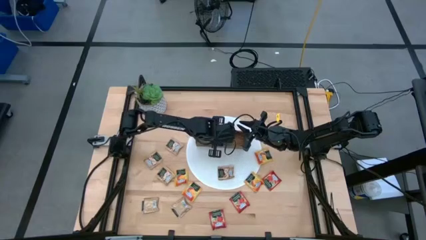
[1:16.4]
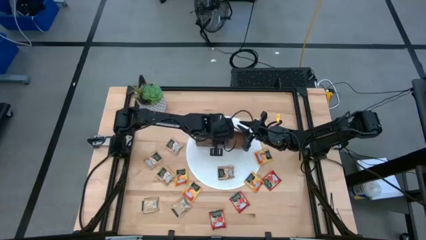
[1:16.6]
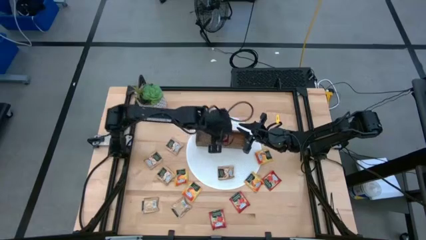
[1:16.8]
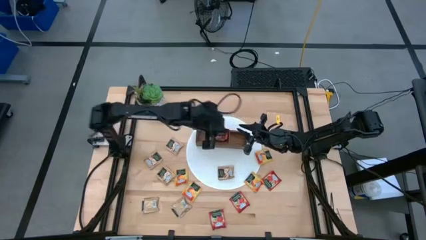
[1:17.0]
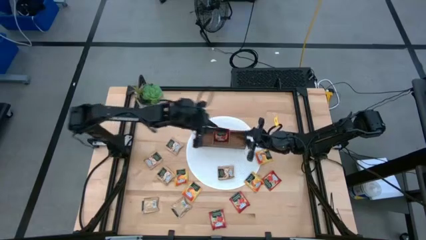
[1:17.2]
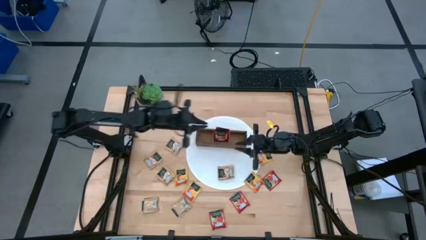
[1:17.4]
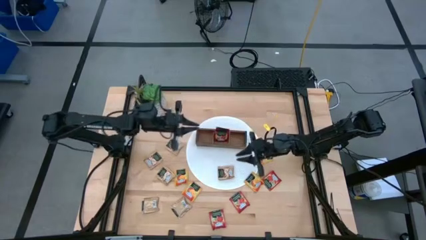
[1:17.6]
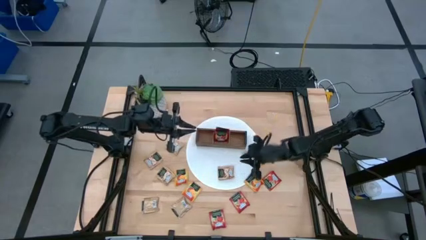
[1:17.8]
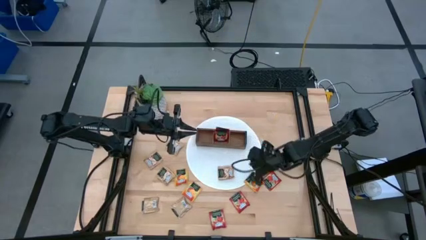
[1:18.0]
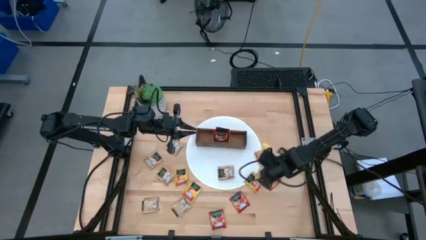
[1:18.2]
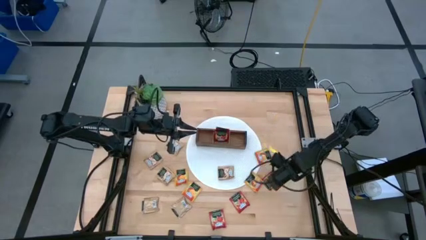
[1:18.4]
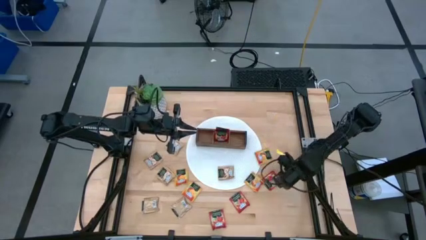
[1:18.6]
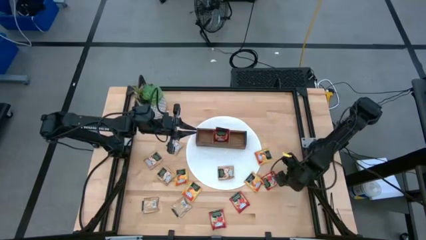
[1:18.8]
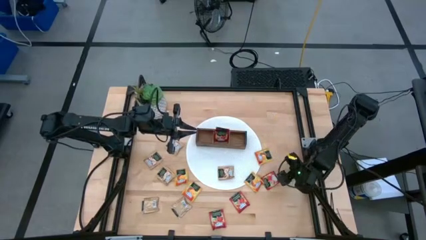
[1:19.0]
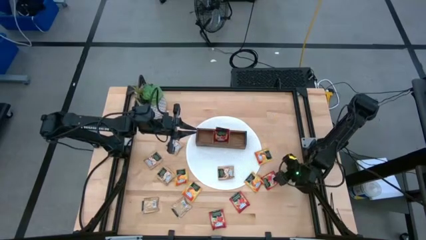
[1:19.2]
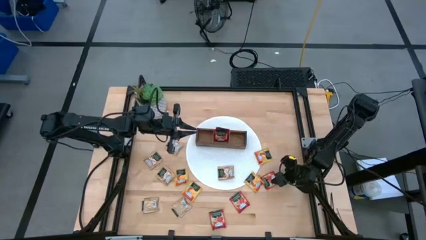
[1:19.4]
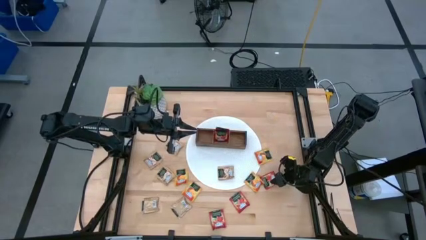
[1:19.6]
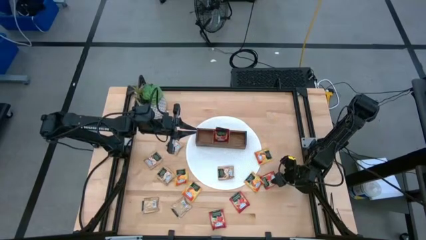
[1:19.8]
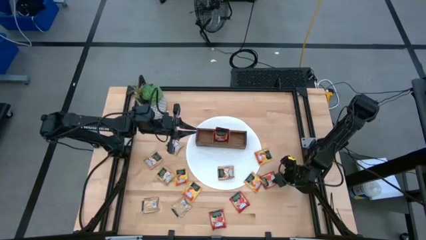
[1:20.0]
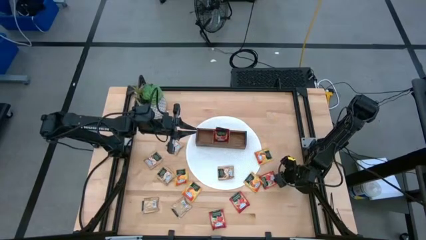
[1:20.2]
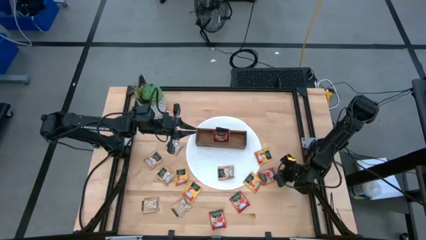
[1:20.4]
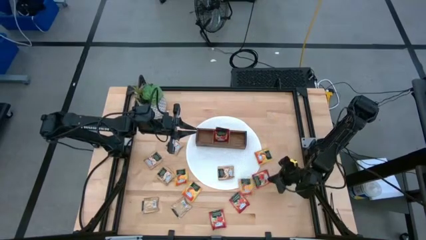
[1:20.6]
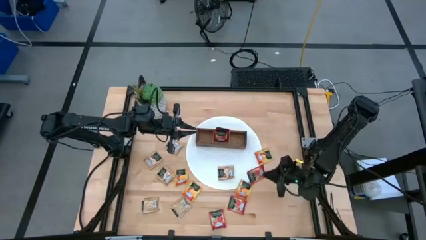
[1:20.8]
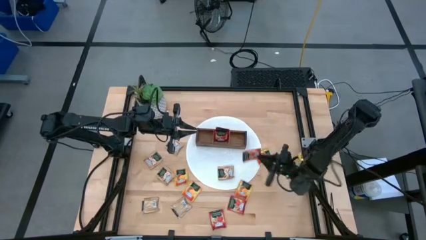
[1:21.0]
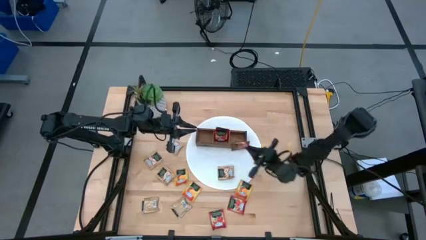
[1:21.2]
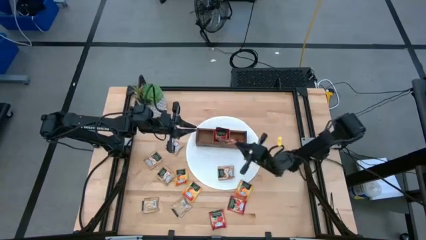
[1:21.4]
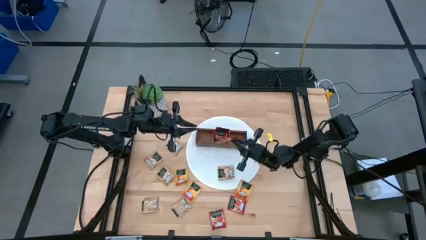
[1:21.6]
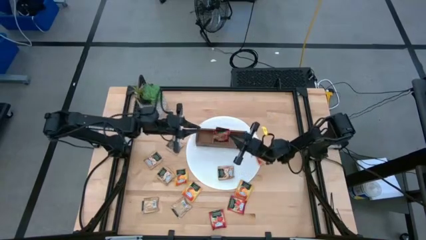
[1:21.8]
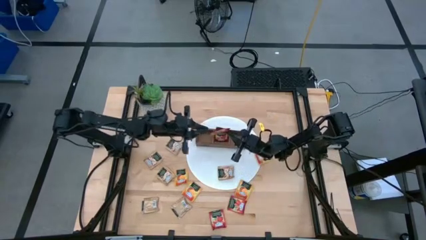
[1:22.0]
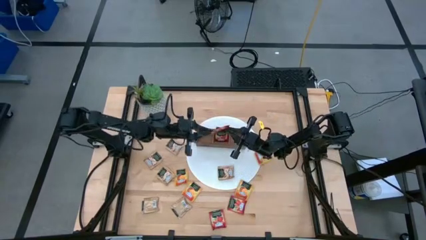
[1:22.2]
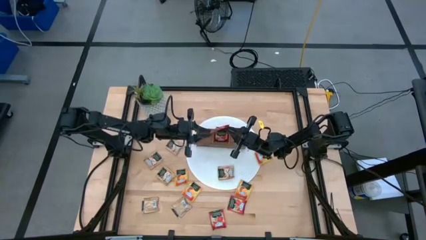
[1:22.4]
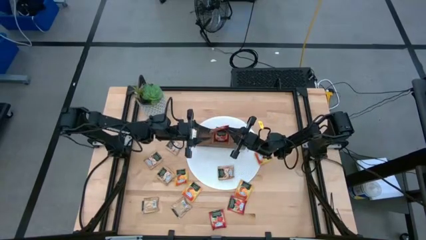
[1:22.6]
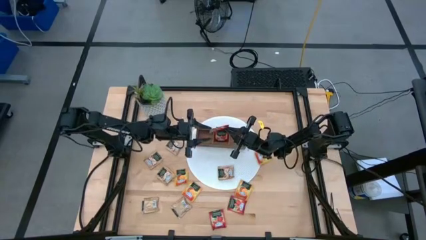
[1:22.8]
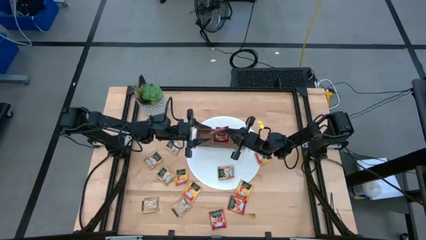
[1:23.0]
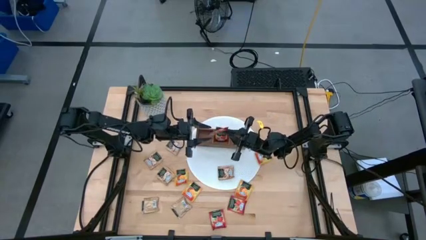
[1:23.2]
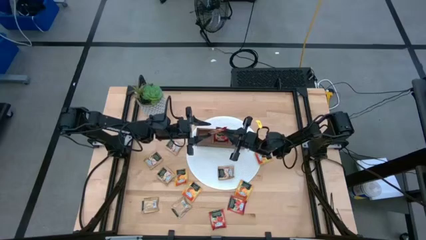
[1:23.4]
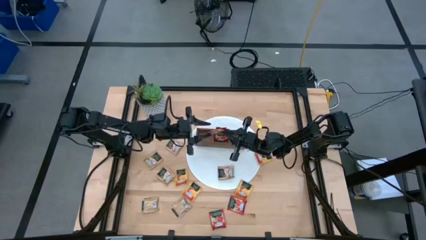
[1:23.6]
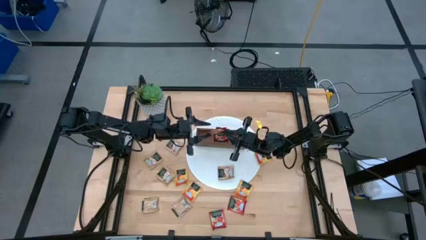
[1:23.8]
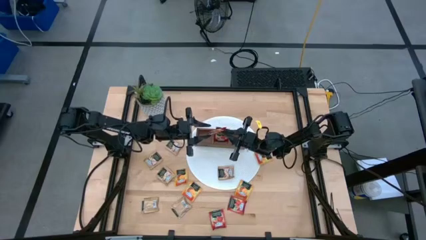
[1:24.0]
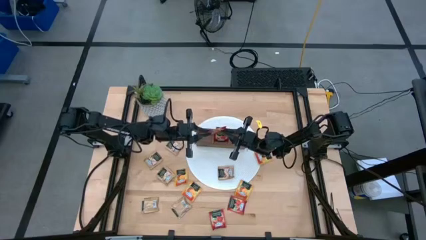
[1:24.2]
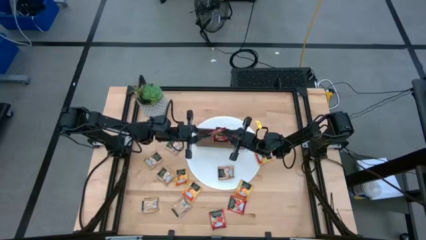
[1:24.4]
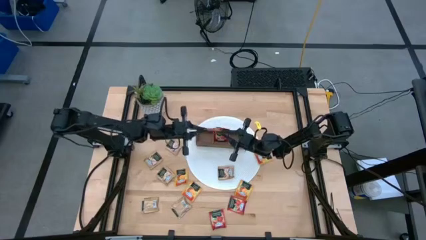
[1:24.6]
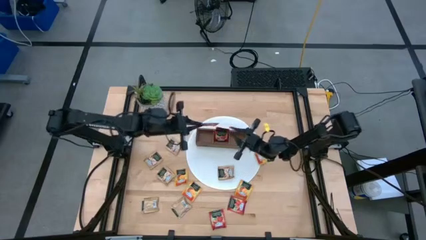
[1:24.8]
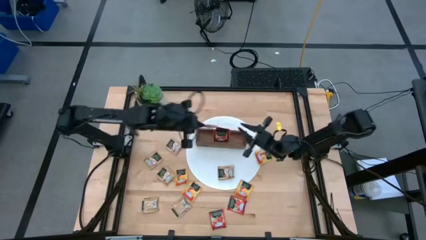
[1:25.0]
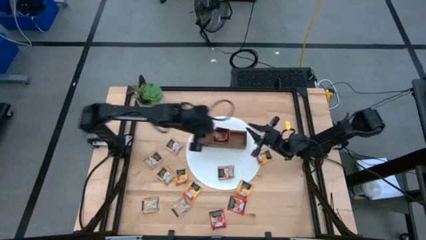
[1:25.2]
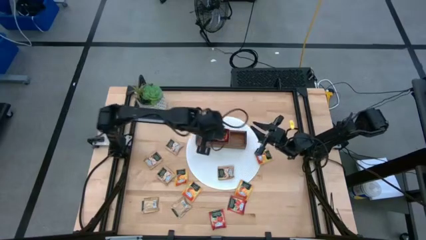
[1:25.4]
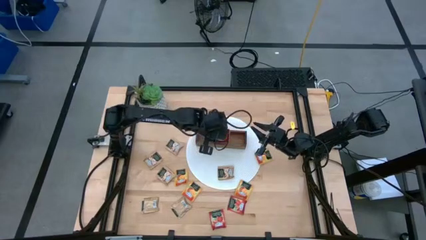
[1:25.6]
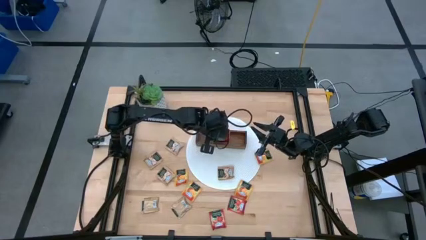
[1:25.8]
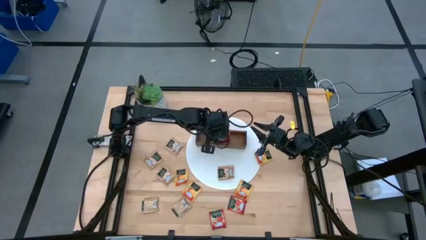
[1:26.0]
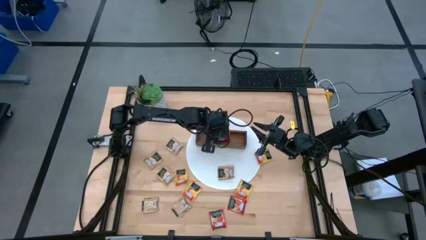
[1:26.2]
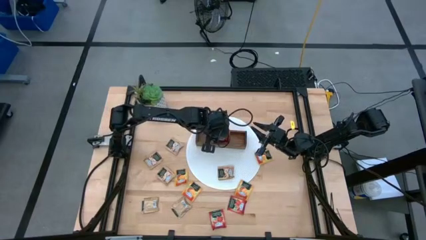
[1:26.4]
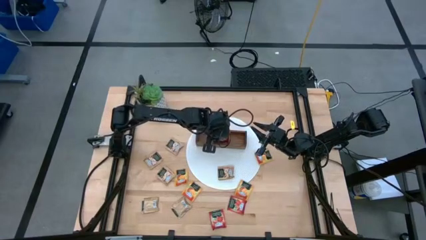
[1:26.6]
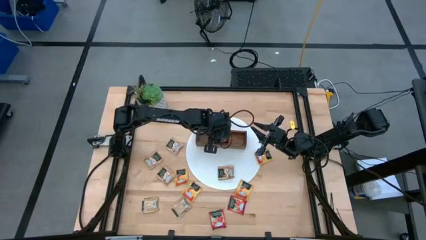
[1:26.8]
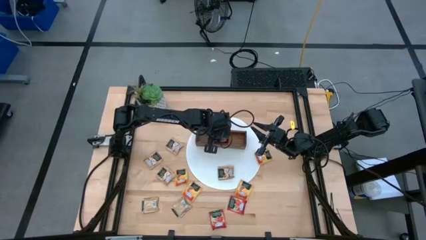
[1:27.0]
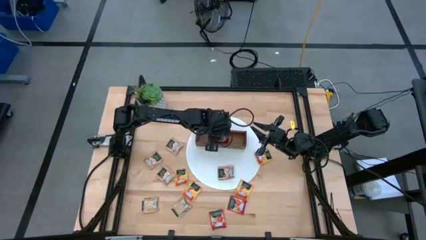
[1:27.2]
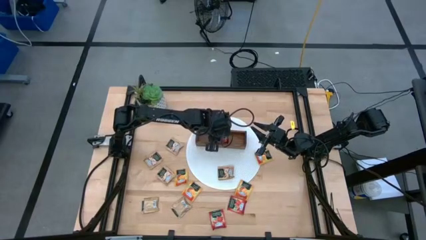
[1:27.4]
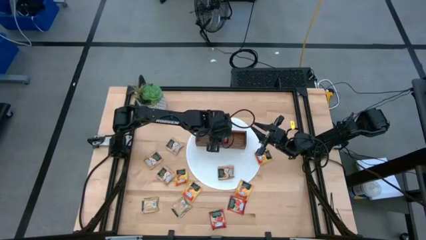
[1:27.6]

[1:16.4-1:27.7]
Task: Pick & Place Tea
Put the red tea bag into the middle section of the wooden organizer
